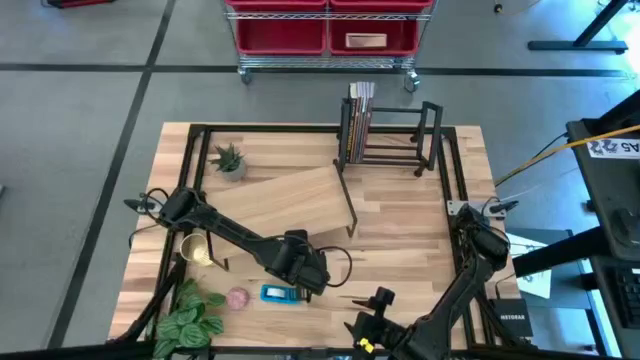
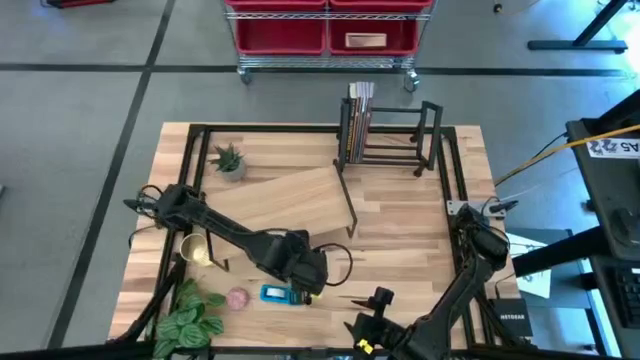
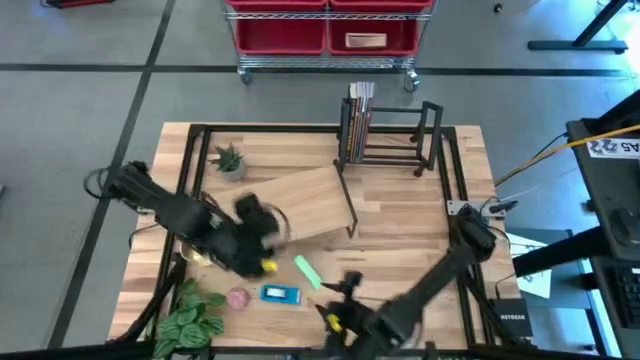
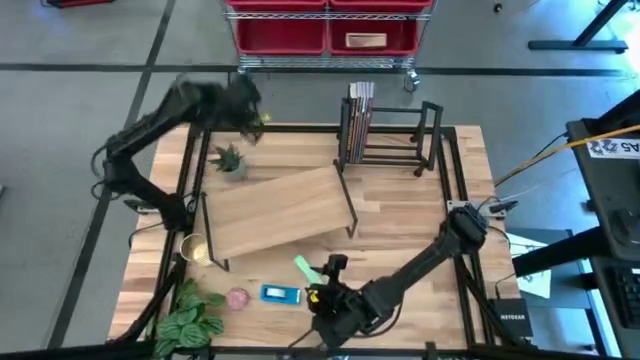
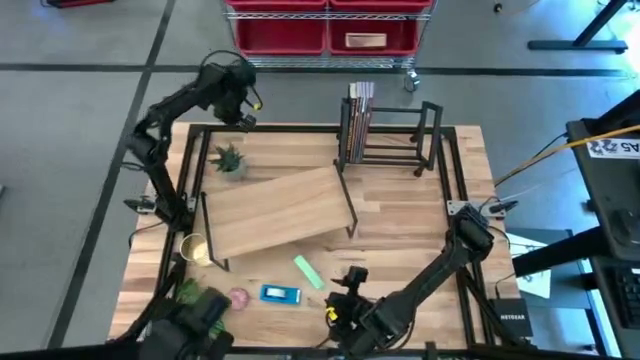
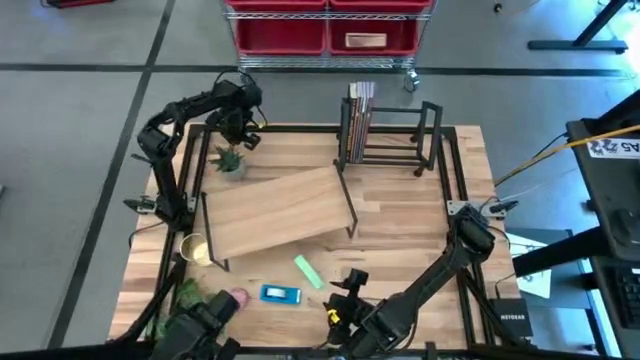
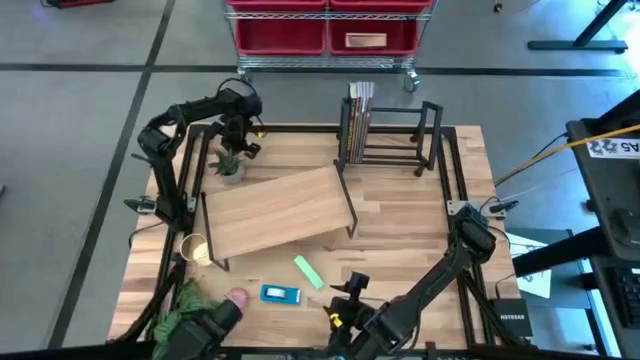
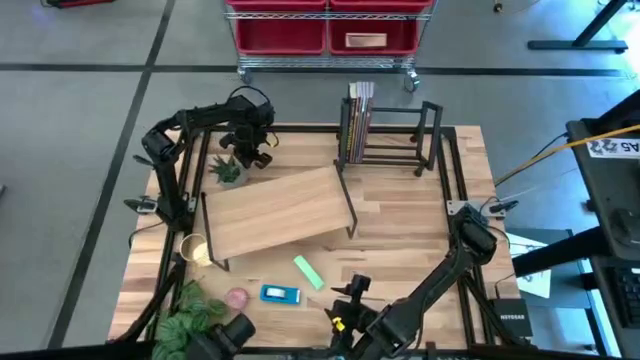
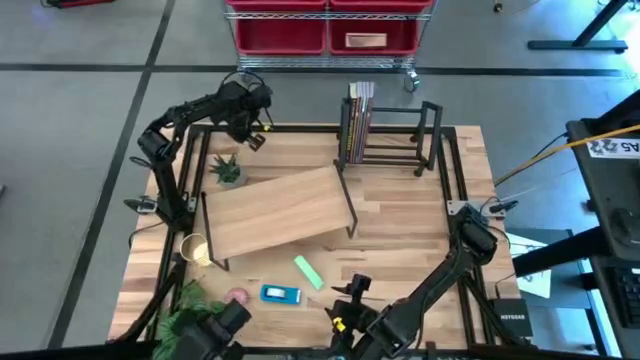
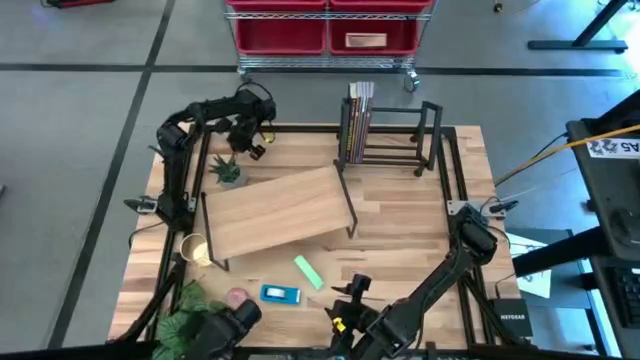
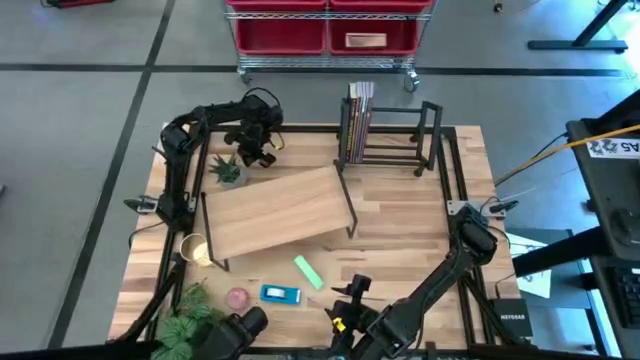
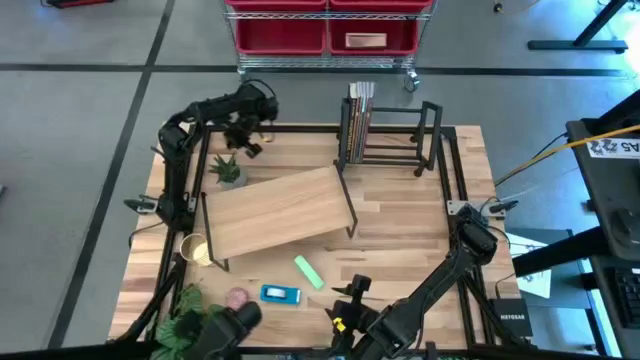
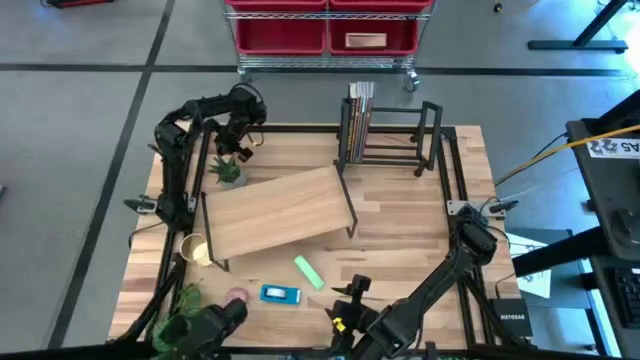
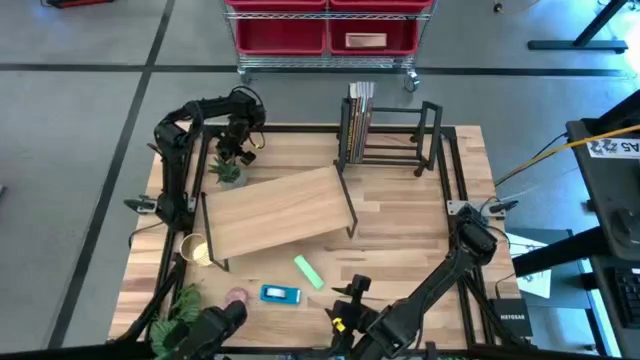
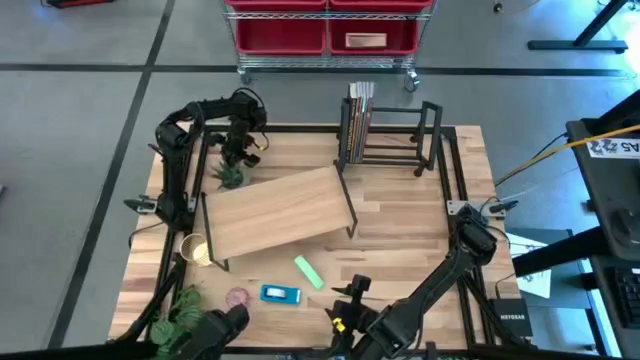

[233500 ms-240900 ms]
Task: Stock shelves
Remove the gray plotted plant from under the shelf

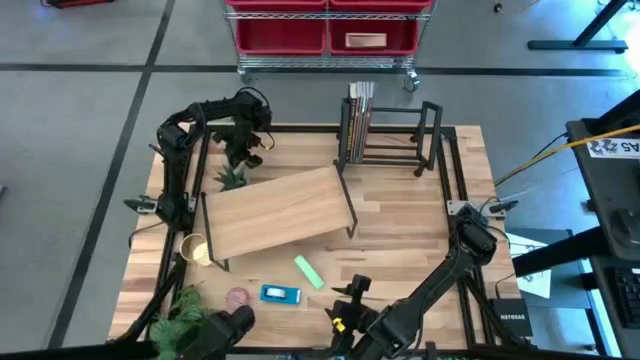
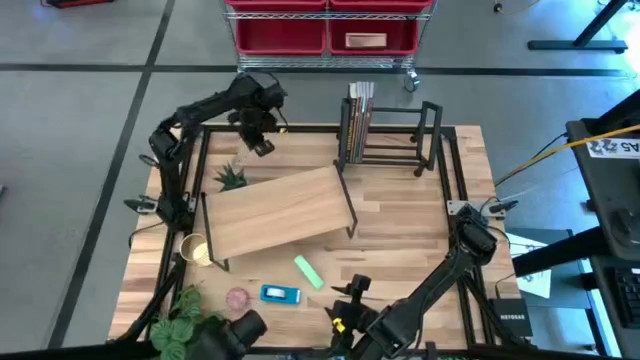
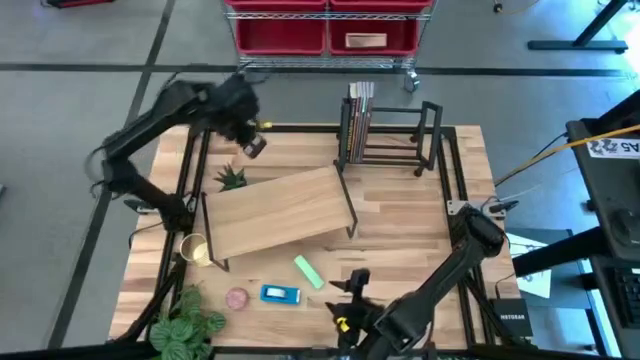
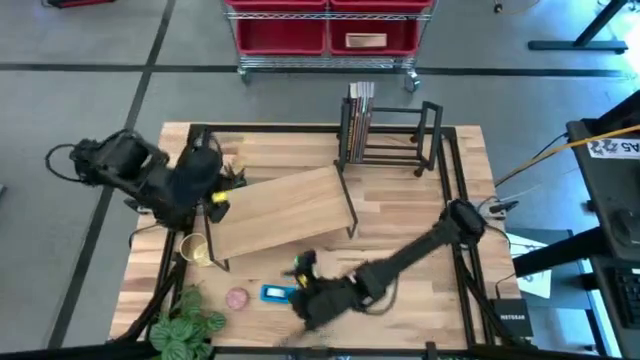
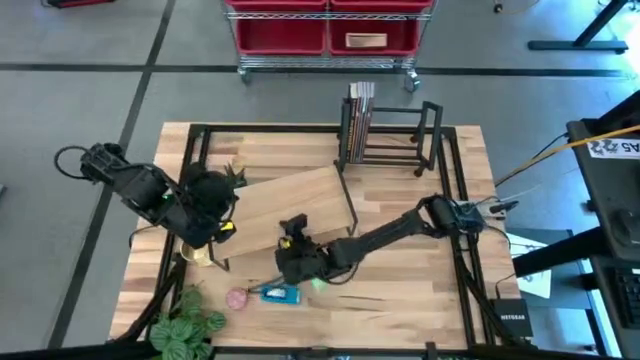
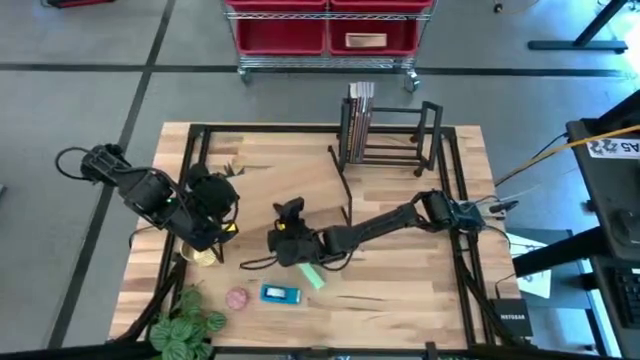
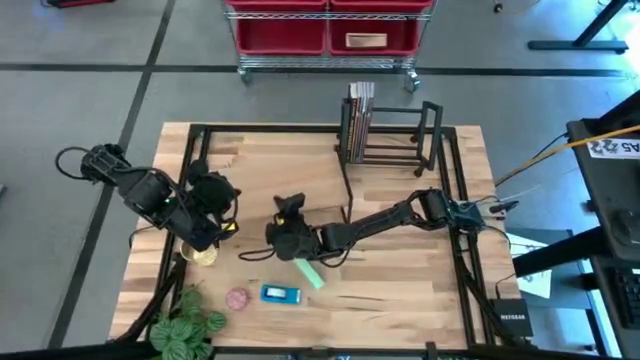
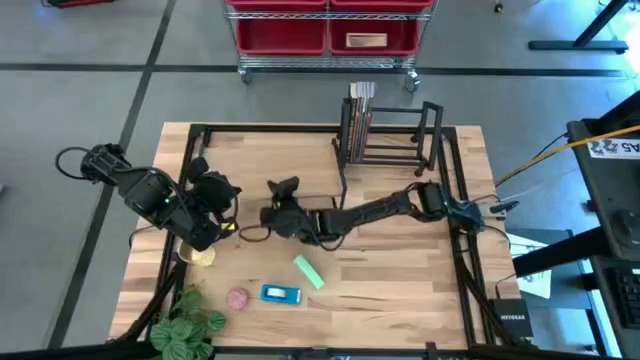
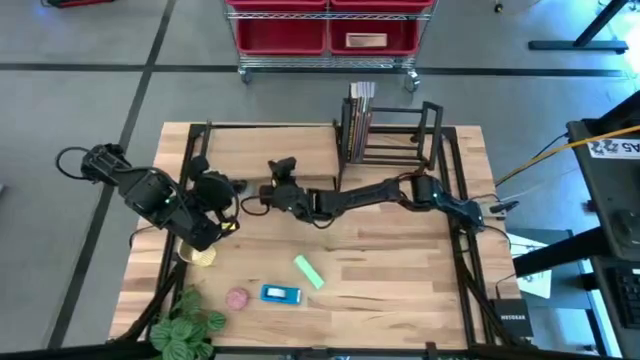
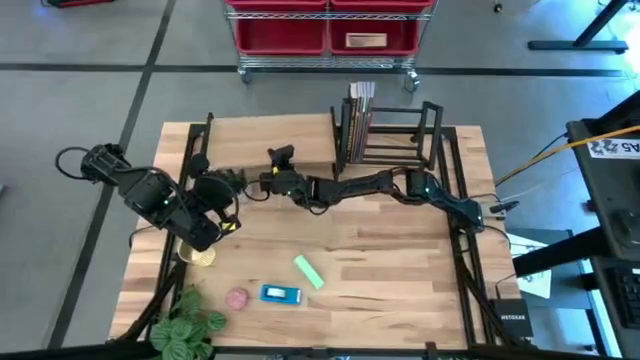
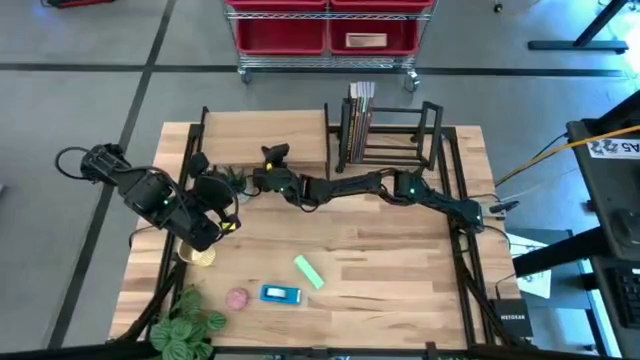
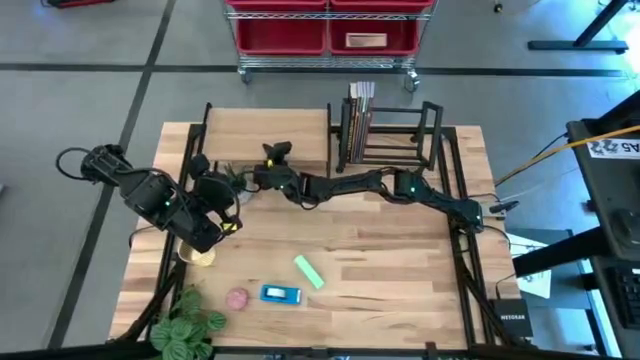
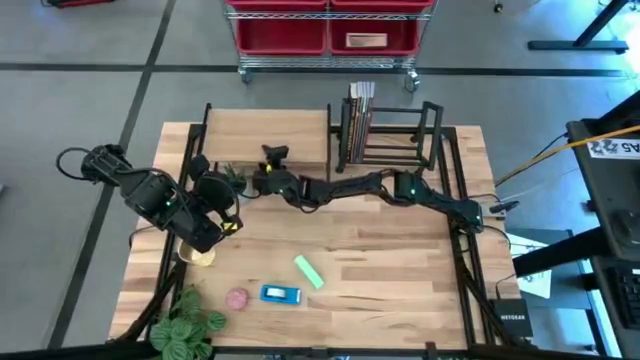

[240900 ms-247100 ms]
Move the shelf to the top right

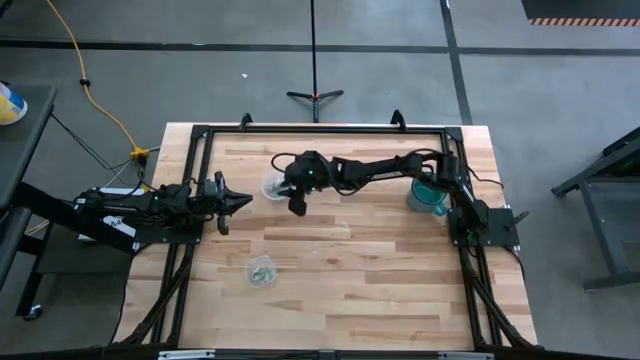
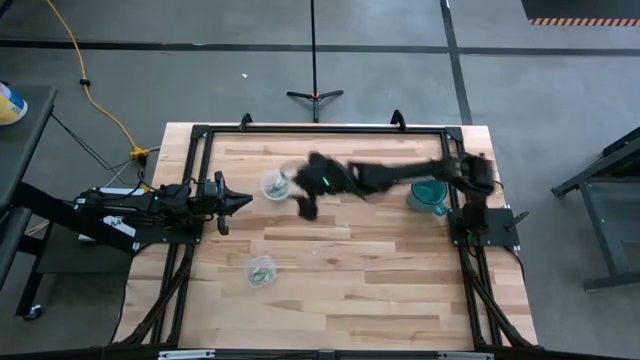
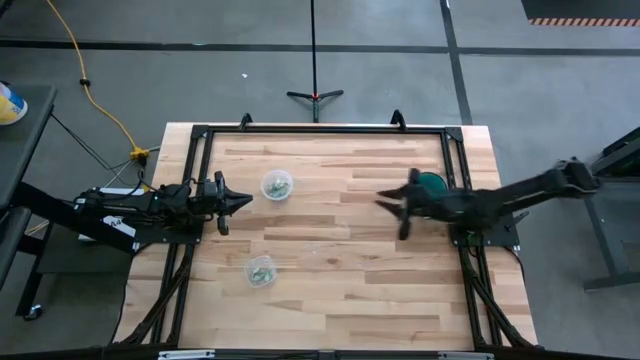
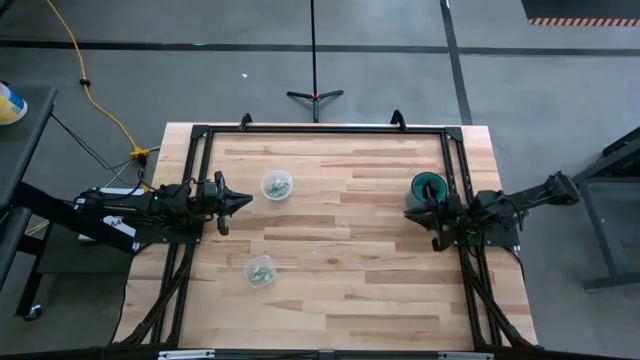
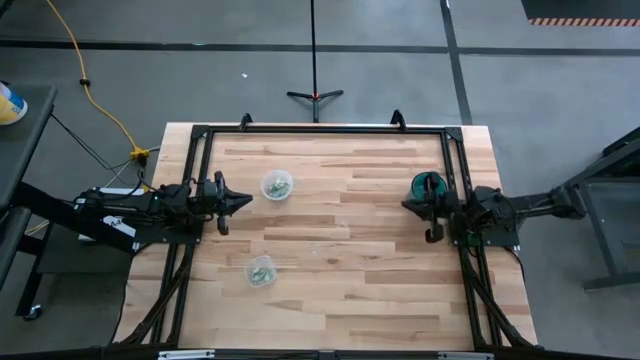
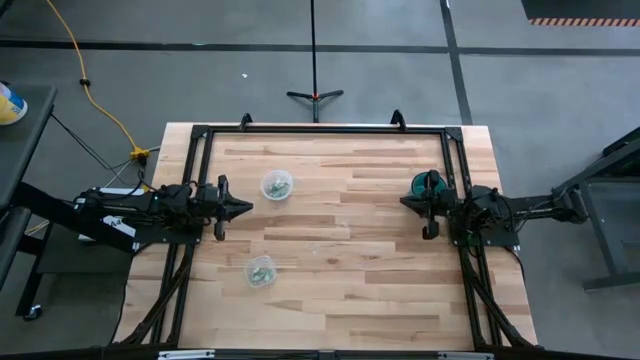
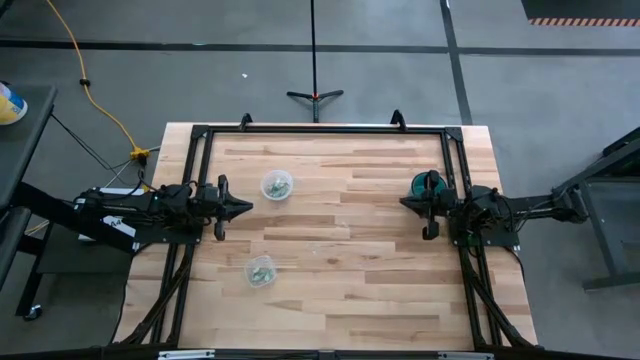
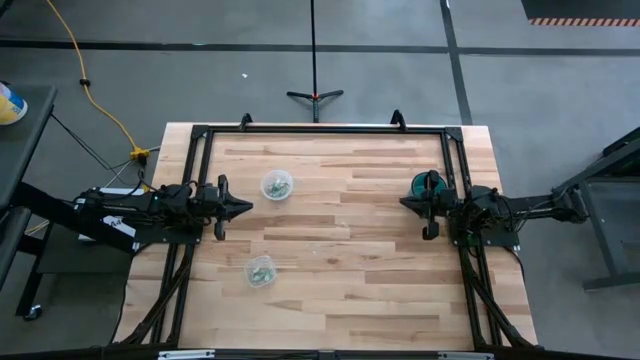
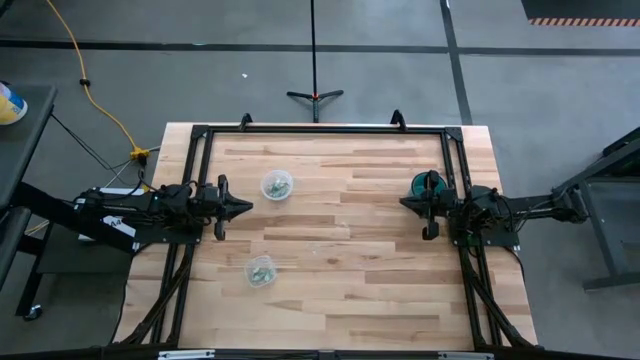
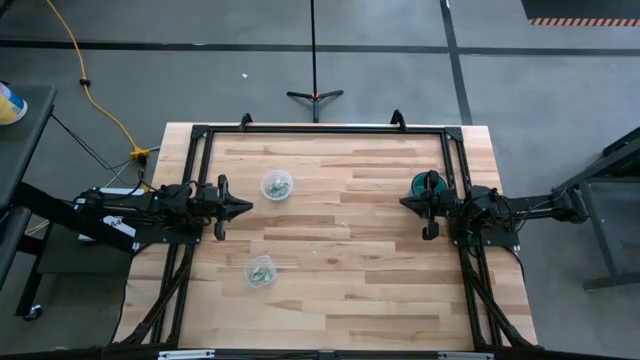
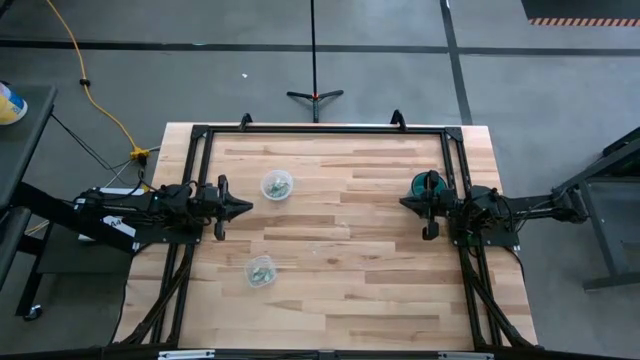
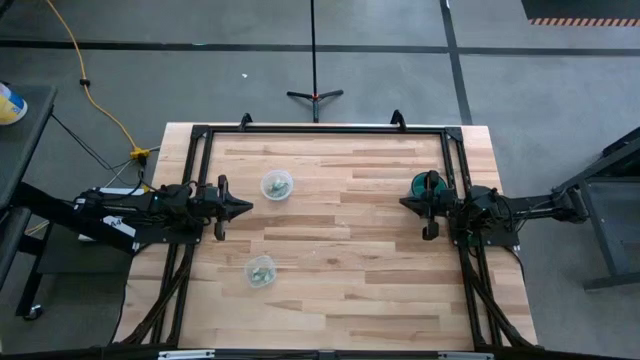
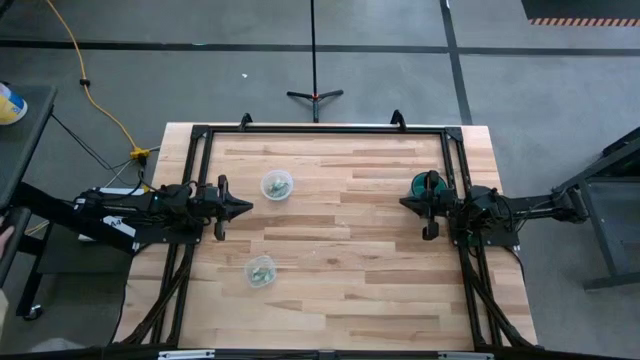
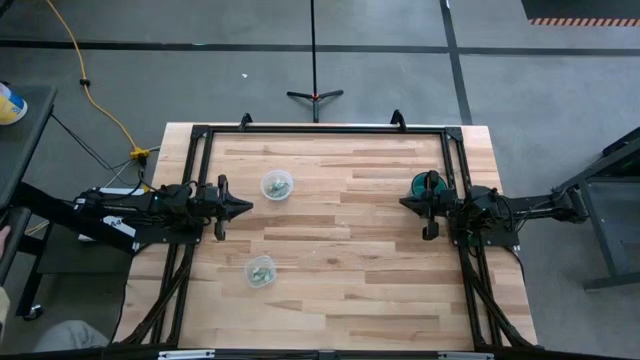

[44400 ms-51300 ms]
Task: Pick and place items into bin
Return to Home Position
